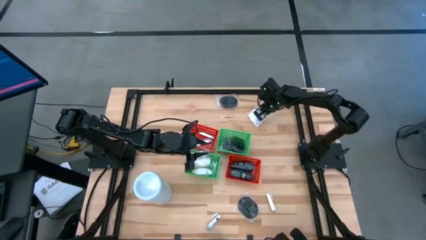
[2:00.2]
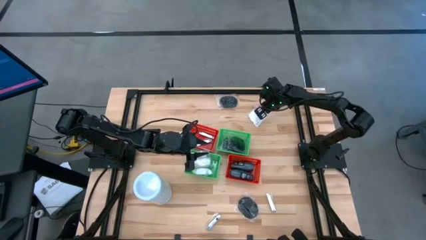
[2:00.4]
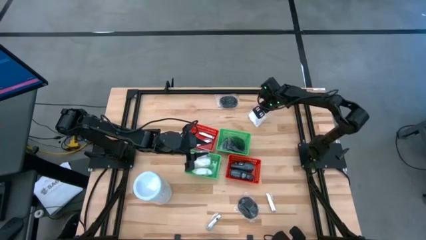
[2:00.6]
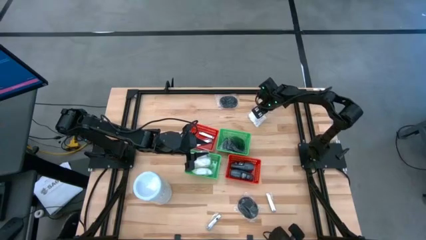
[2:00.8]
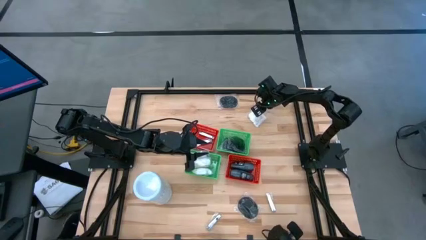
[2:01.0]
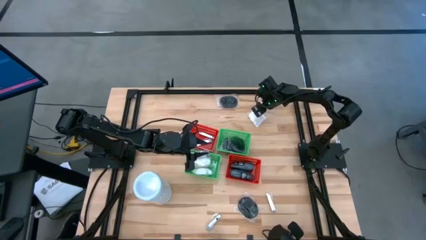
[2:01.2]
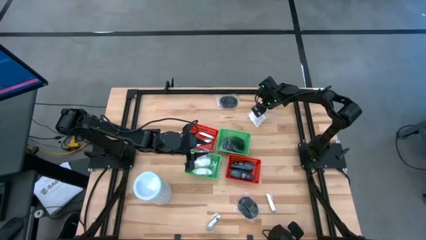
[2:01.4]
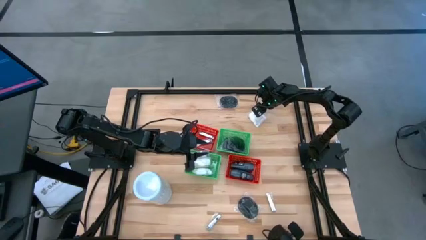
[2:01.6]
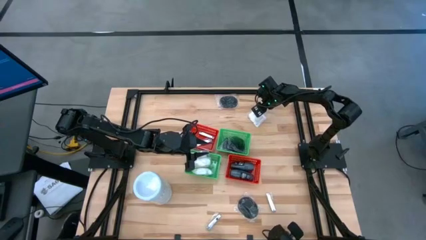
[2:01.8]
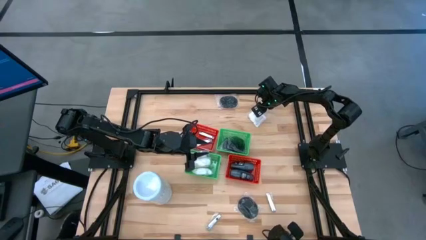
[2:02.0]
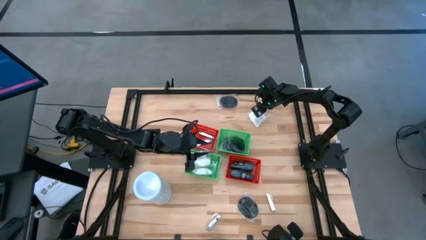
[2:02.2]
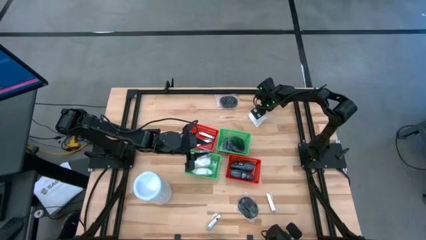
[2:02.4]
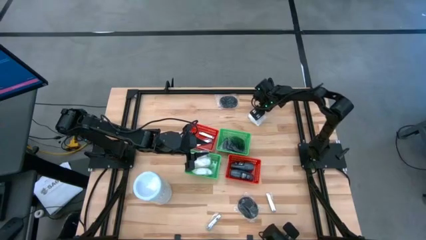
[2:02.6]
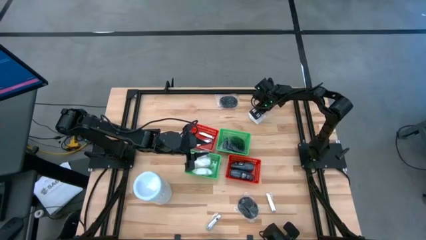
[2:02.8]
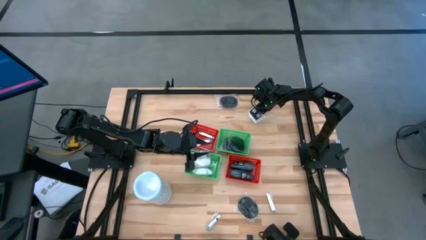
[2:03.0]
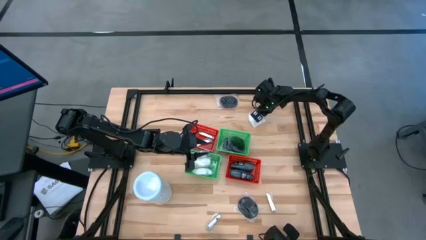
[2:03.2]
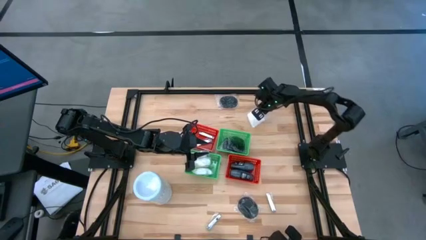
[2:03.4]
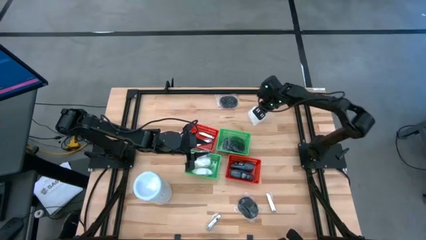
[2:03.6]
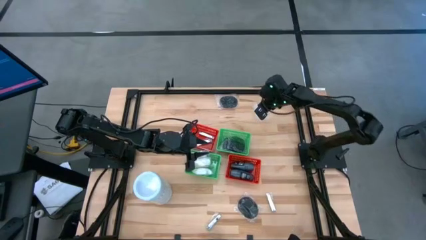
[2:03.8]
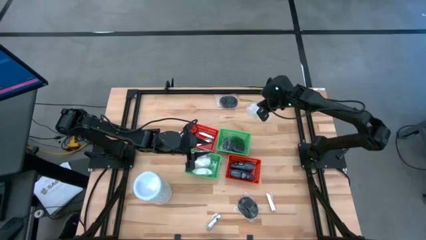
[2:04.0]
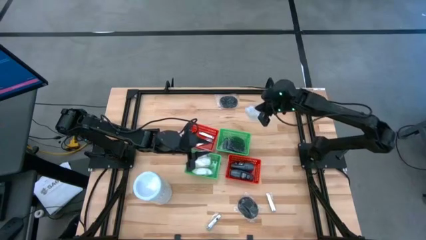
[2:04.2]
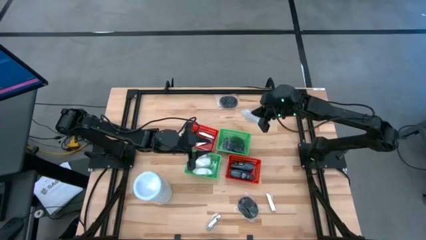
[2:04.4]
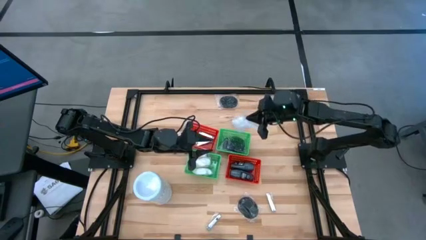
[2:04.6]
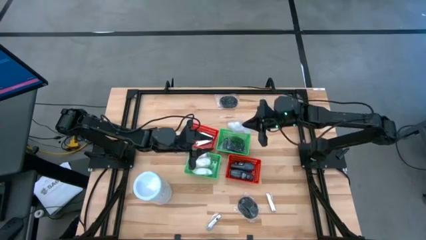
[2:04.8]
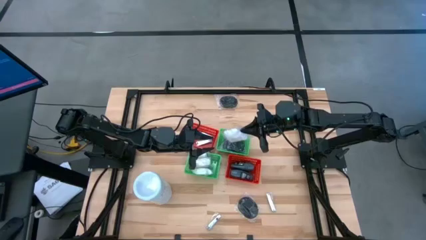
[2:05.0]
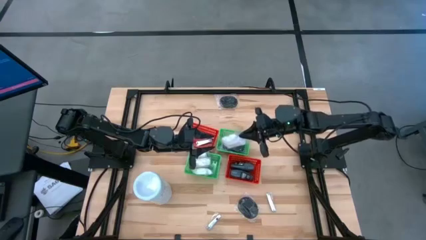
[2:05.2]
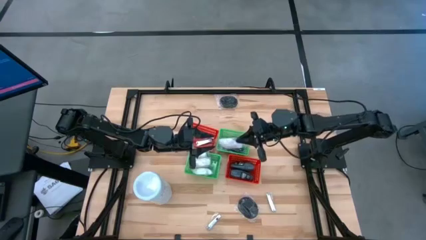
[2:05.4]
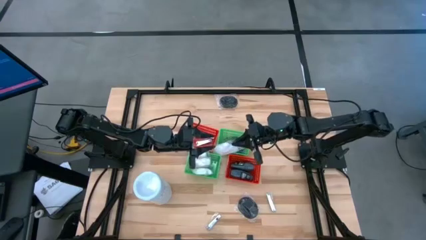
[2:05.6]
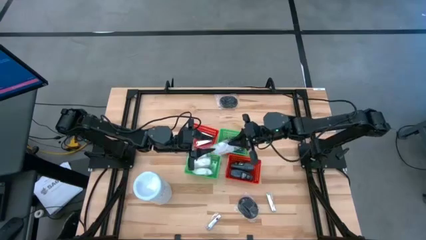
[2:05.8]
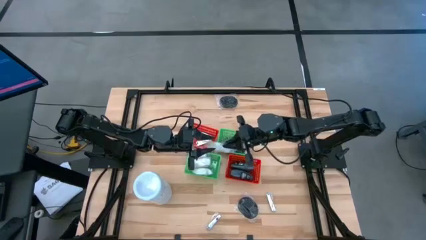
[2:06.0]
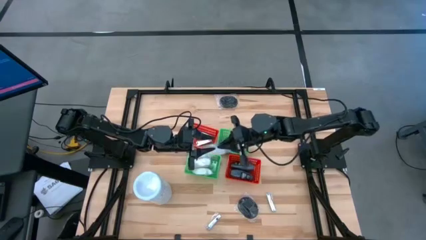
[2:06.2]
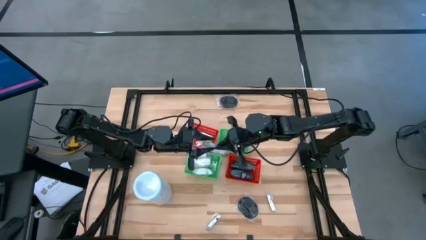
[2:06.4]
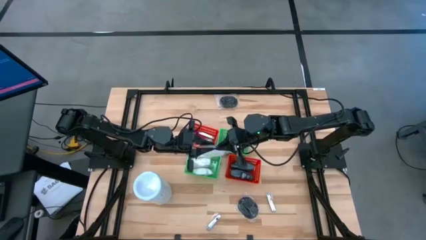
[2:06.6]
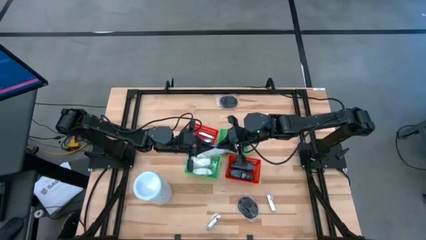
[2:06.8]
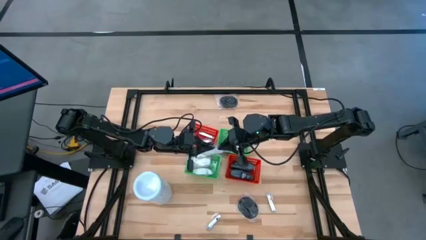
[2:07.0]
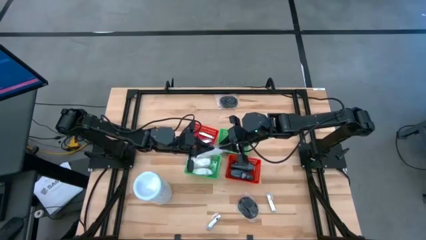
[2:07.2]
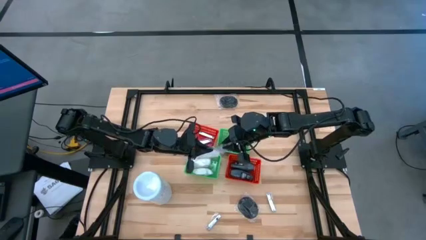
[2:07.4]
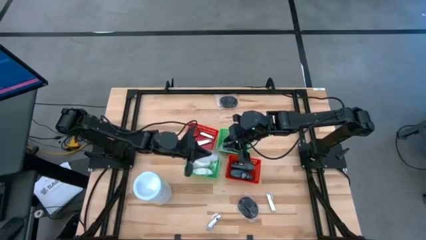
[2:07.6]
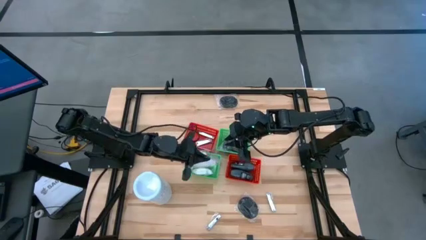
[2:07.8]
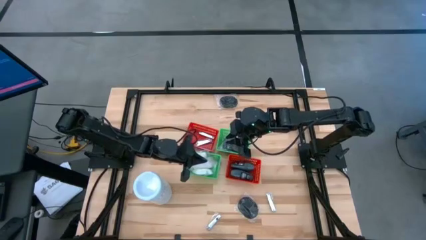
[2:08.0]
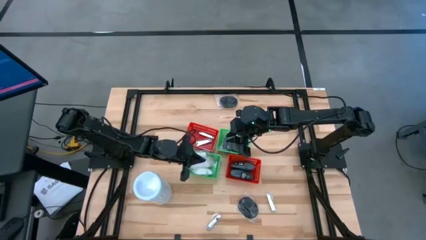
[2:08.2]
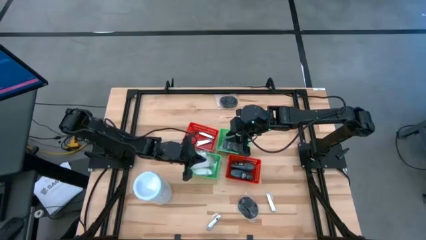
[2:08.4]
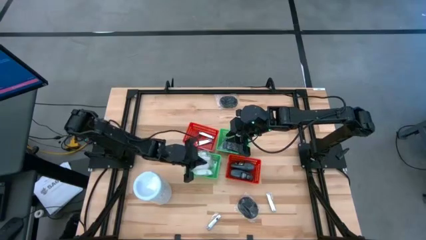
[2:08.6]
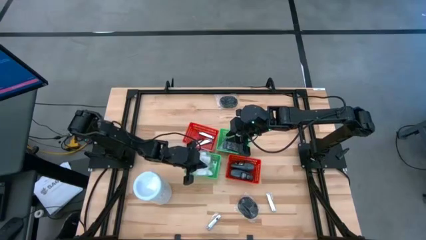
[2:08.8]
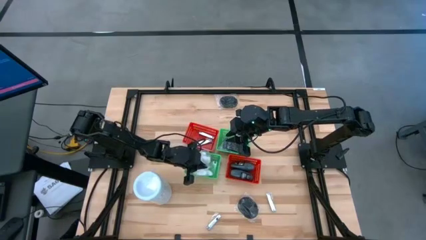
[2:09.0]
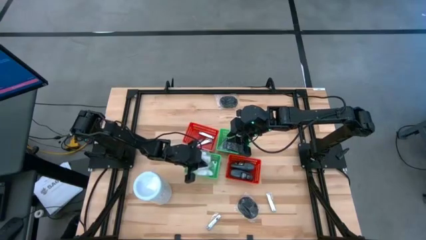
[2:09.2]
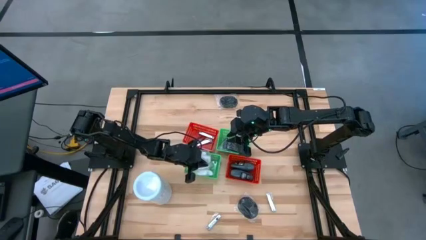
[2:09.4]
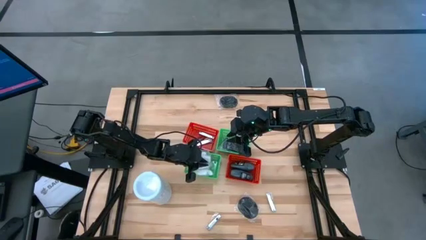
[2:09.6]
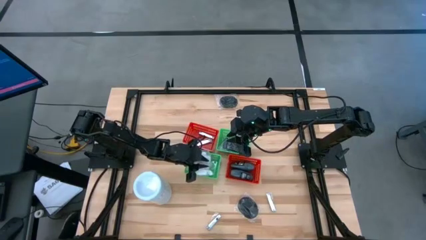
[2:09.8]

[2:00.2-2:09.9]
Task: Pick & Place Travel size toiletries
Put the white cotton pack into the bottom left green bin

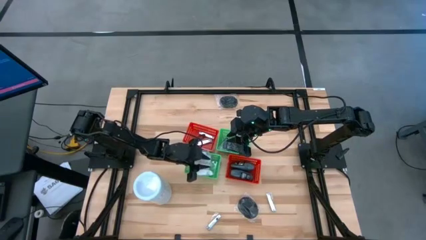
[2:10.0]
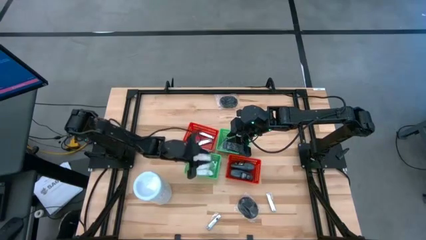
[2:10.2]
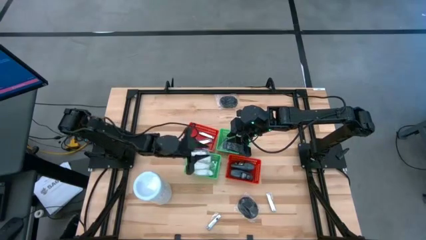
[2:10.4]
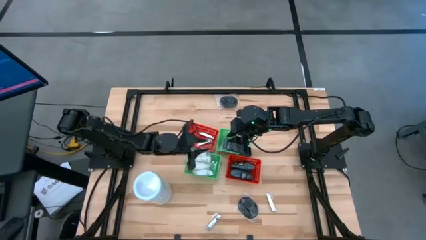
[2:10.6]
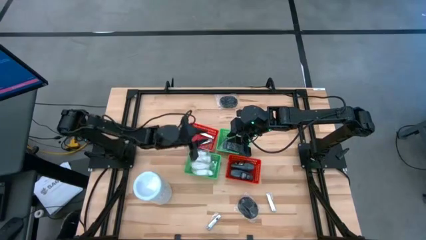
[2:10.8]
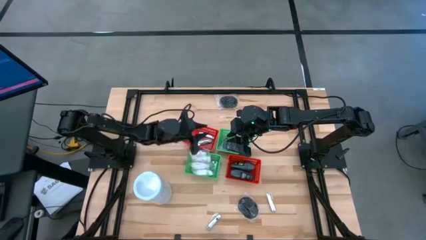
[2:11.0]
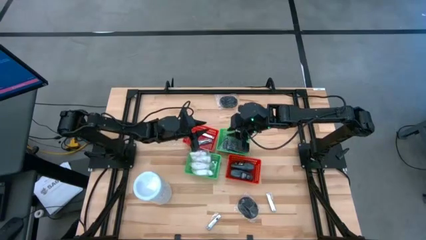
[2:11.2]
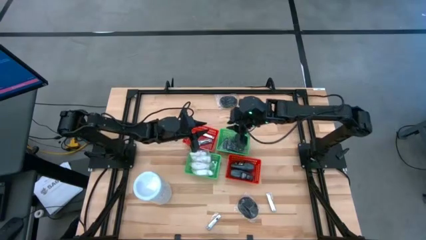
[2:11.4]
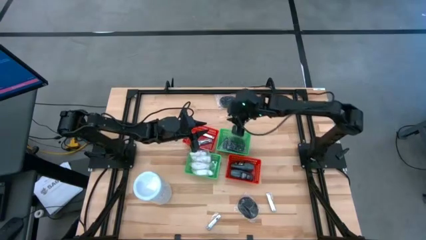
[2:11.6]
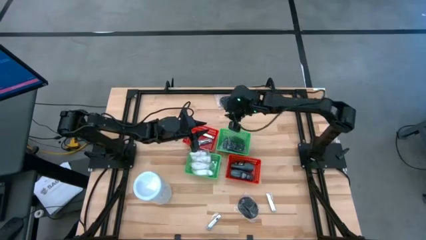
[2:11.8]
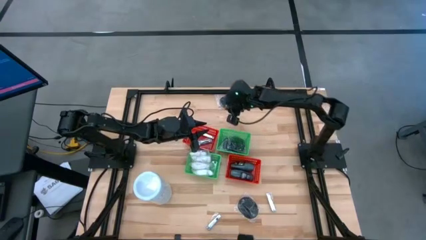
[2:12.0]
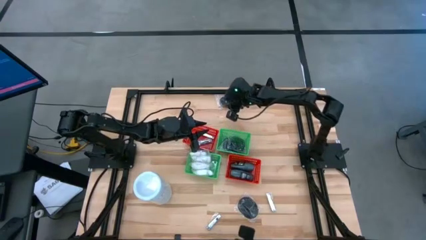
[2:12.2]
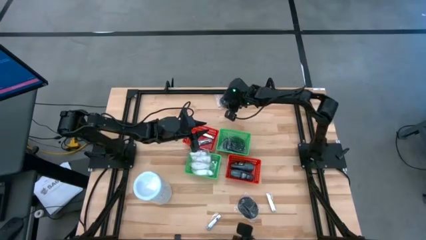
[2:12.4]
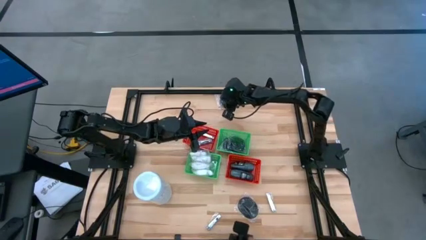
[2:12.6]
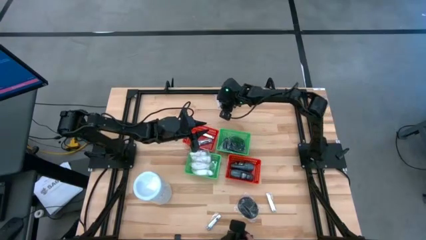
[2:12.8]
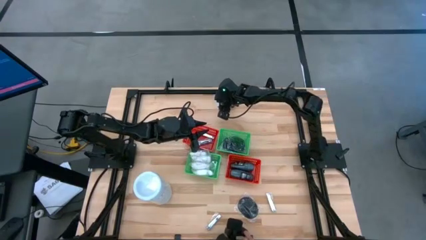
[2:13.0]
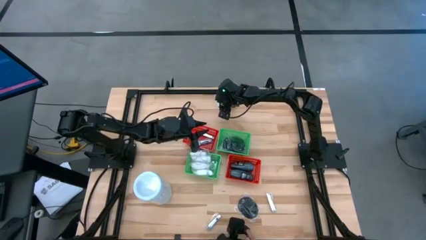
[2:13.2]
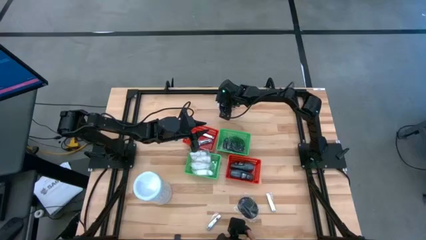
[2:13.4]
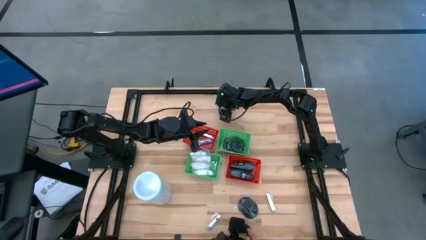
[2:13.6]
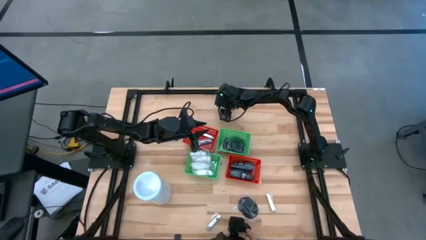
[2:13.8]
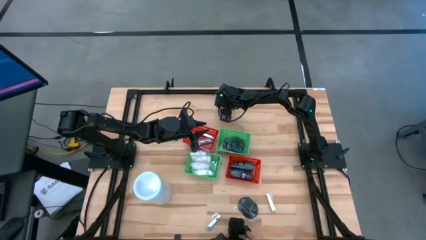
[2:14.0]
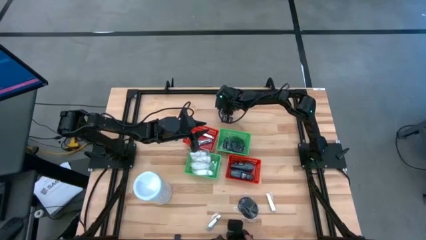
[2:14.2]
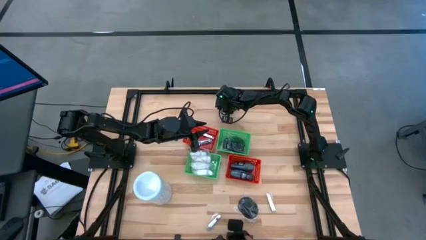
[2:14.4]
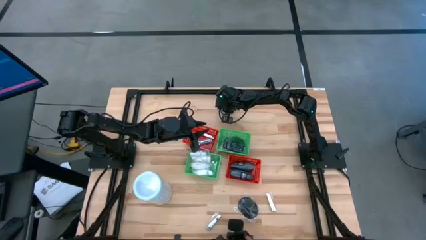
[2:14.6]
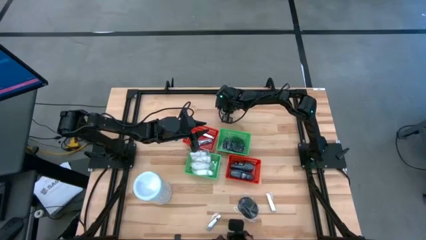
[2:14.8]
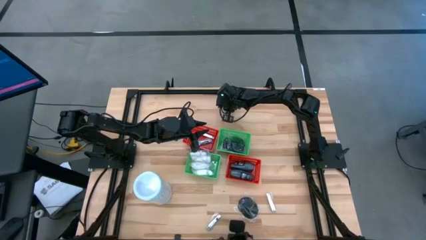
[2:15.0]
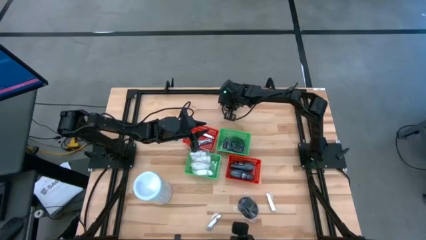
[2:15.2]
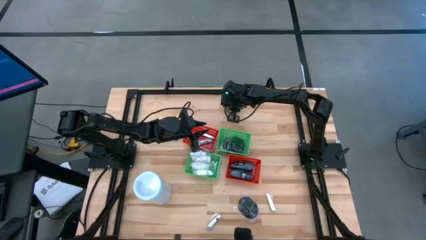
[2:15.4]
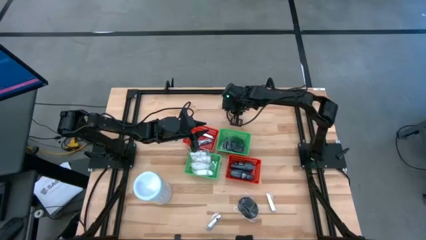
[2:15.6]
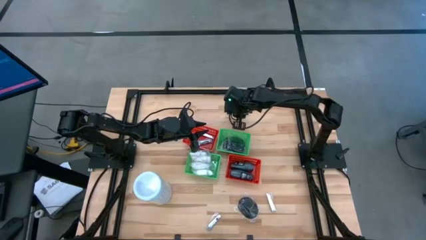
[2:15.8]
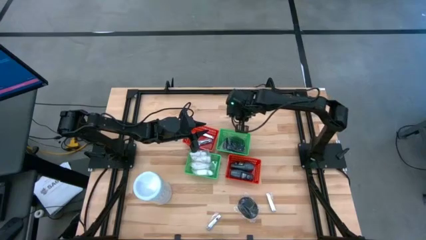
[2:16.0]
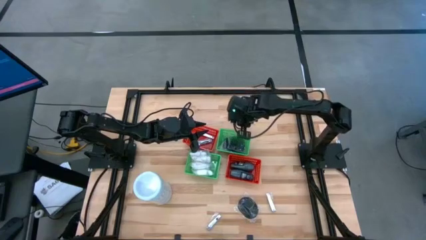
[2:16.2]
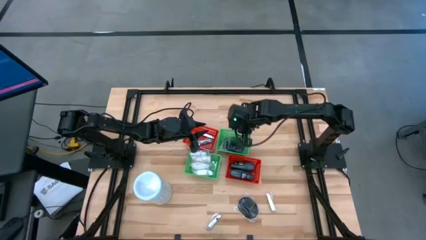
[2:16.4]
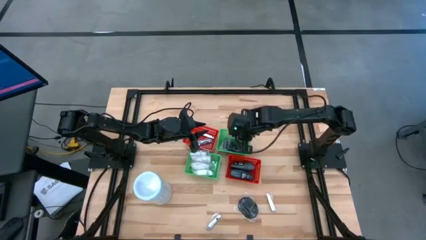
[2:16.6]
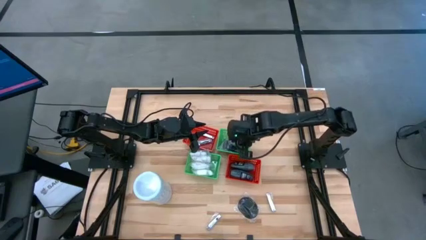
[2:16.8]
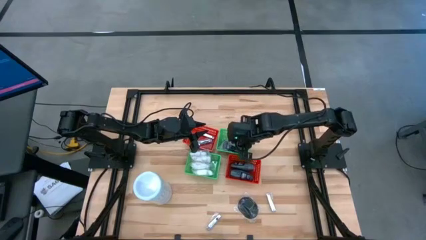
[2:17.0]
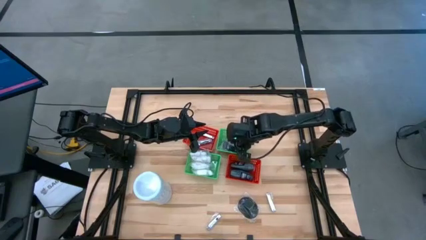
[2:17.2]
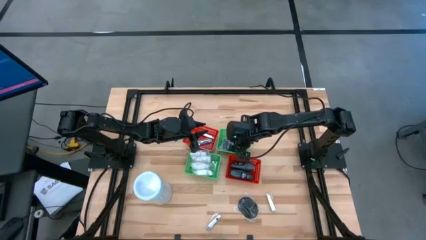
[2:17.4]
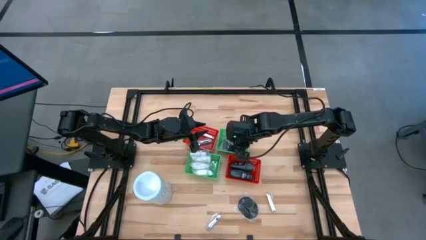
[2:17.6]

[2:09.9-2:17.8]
Put the black hairbrush into the top right green bin
